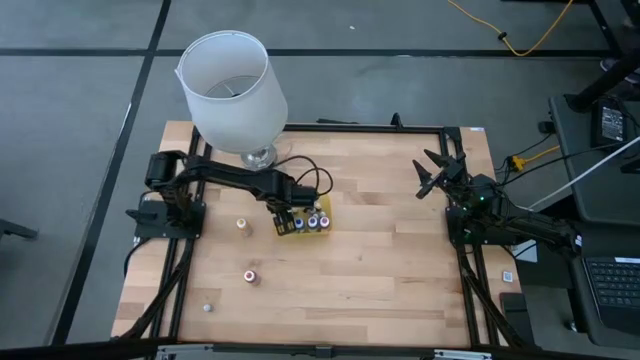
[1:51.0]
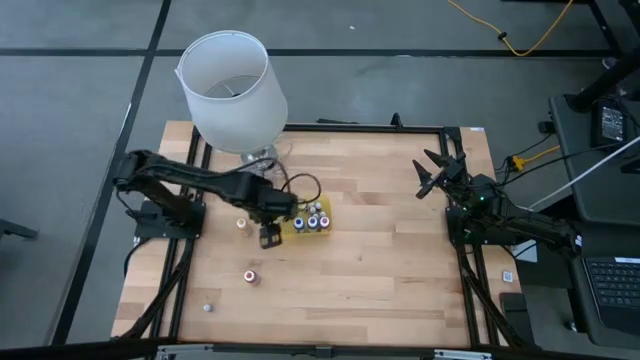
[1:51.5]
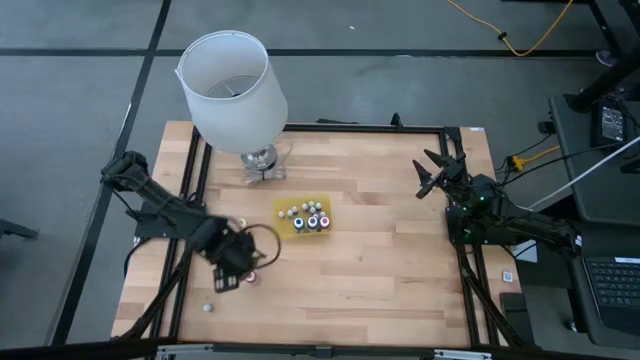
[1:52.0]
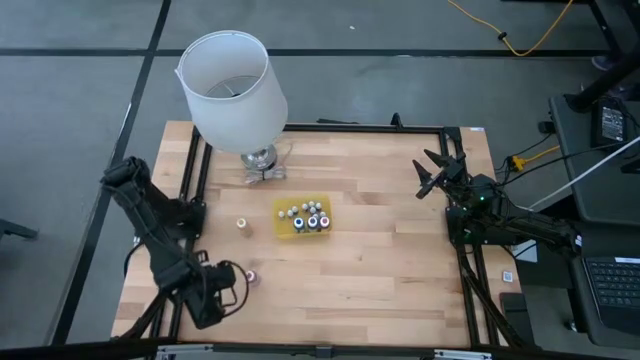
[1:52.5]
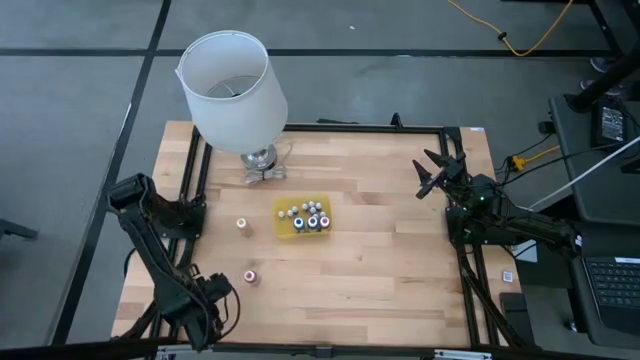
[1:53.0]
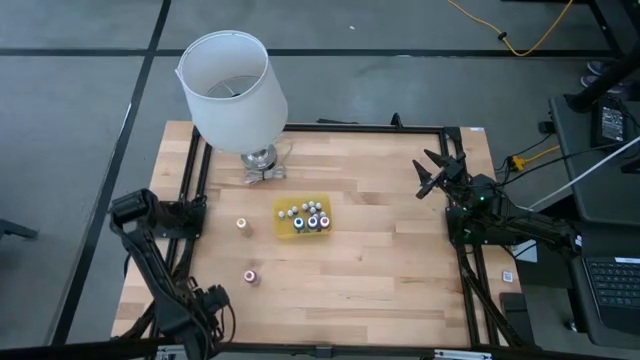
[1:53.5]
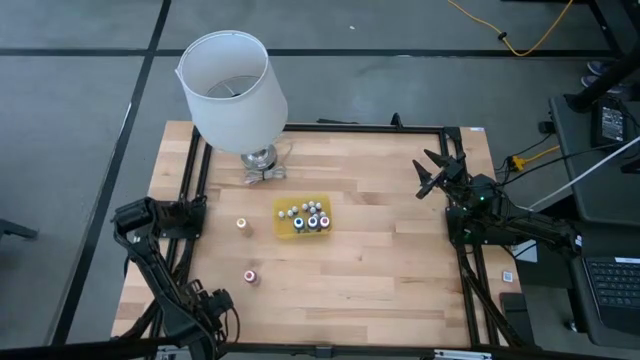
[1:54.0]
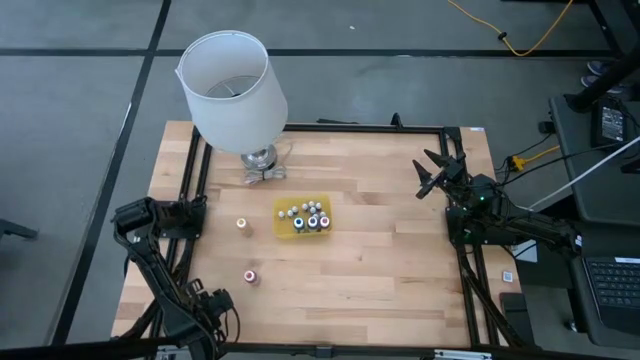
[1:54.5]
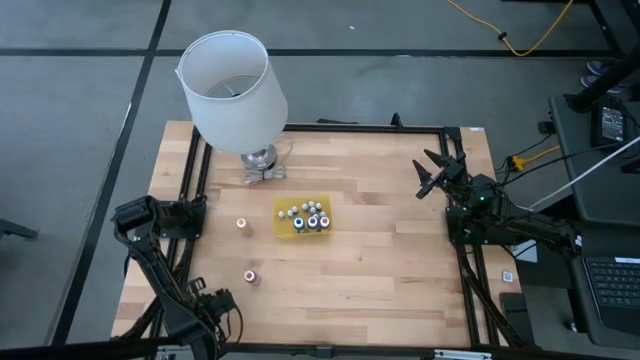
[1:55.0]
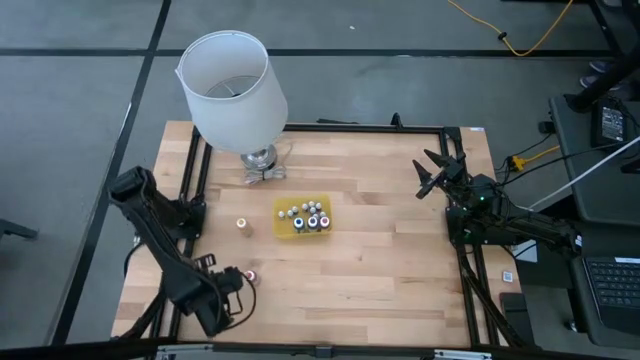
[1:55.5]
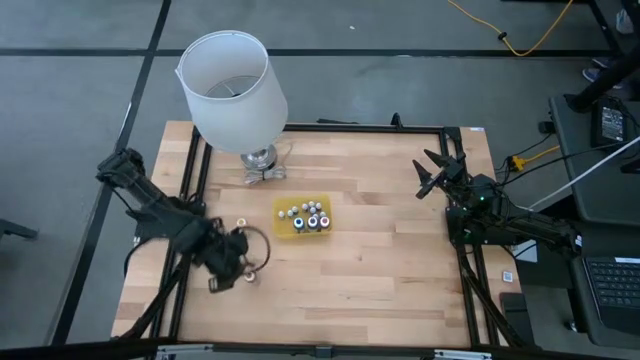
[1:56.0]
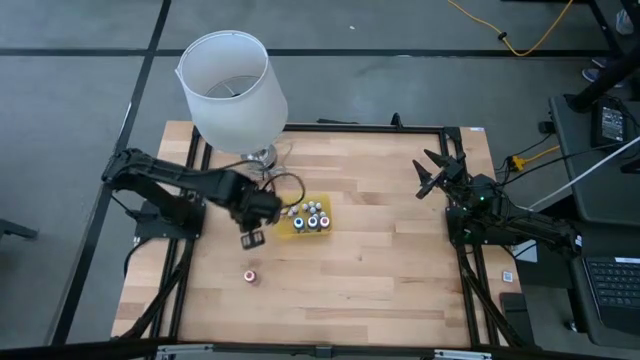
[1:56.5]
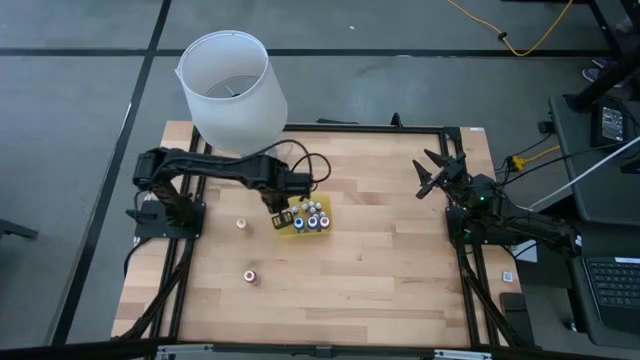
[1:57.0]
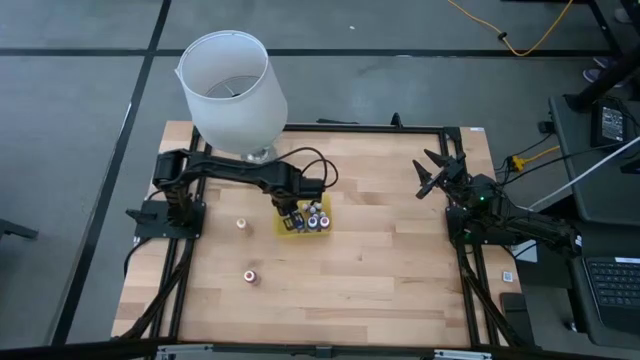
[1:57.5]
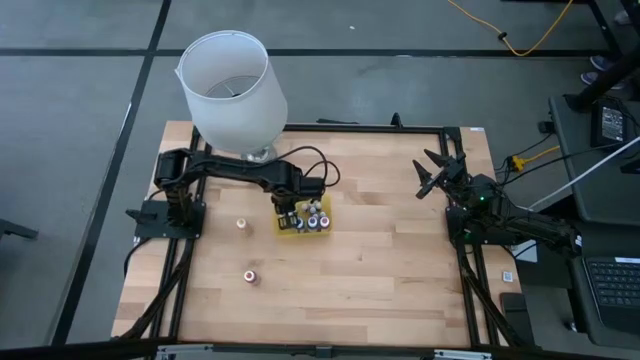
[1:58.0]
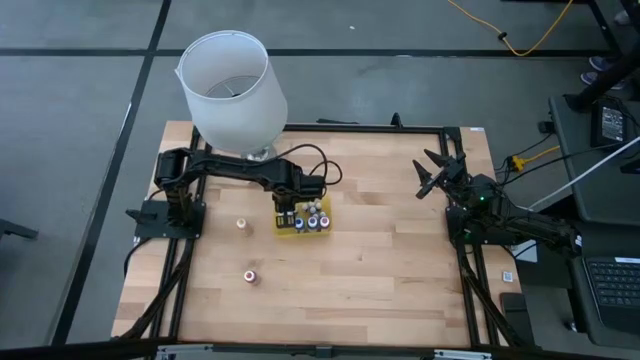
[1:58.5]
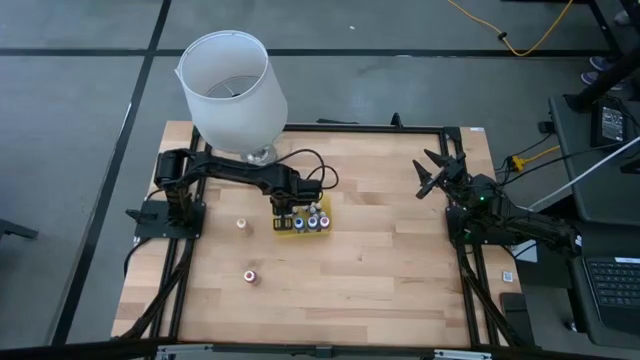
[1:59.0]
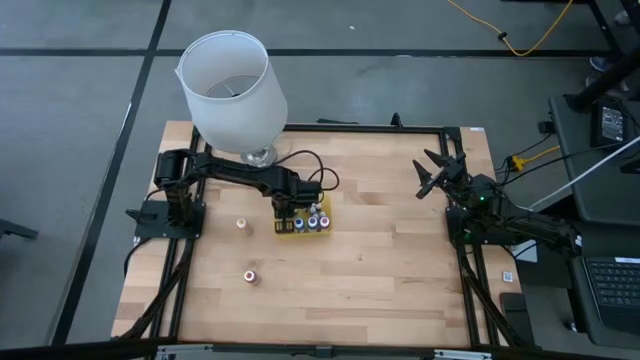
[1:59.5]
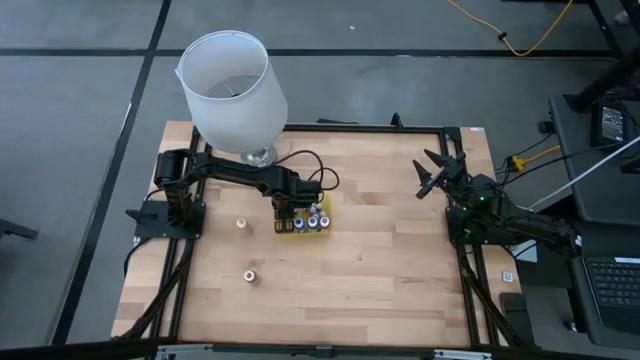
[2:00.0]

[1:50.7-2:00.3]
Task: Pick & Place food coloring
Put the black food coloring bottle into the yellow bin

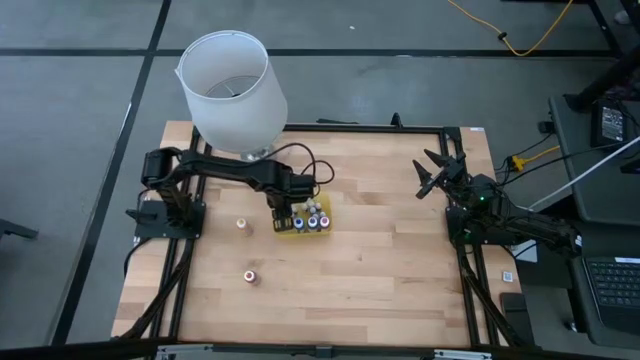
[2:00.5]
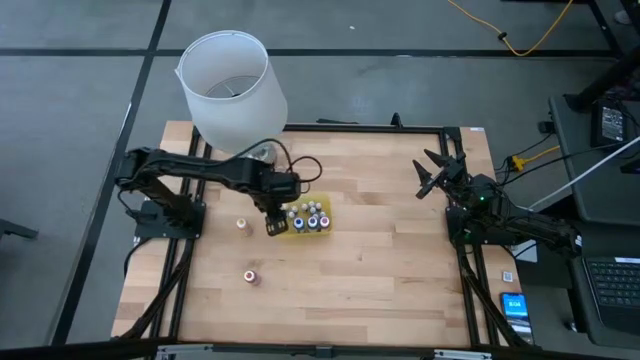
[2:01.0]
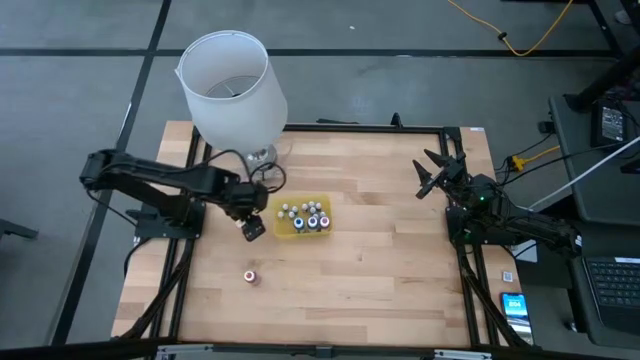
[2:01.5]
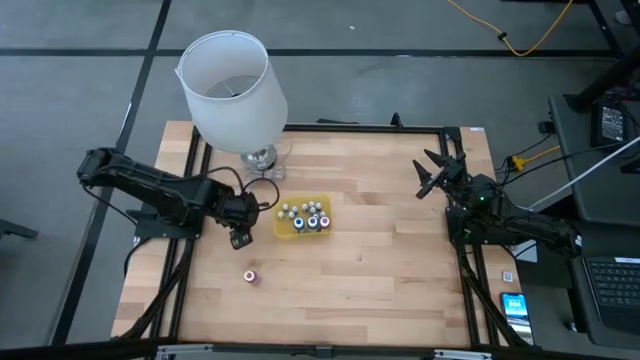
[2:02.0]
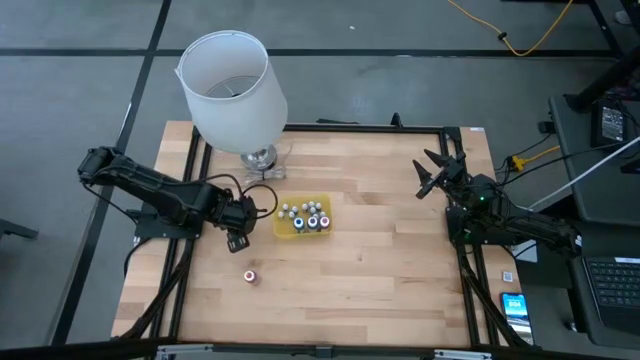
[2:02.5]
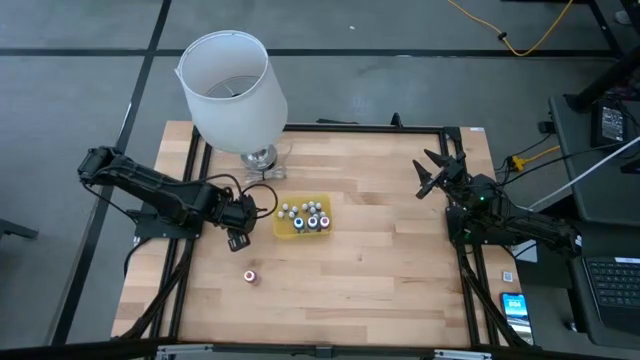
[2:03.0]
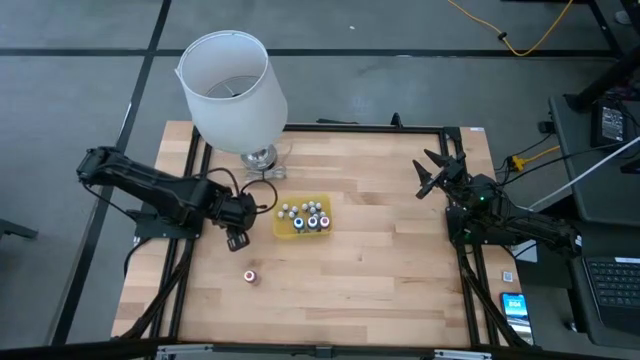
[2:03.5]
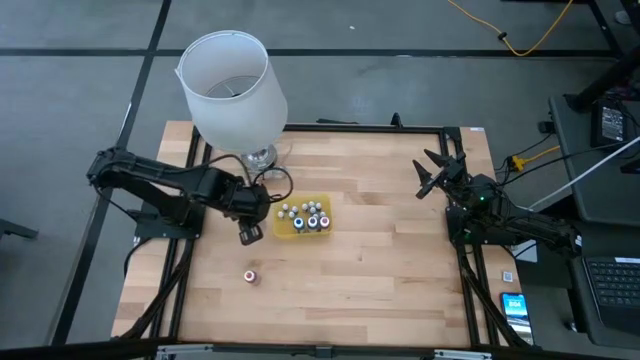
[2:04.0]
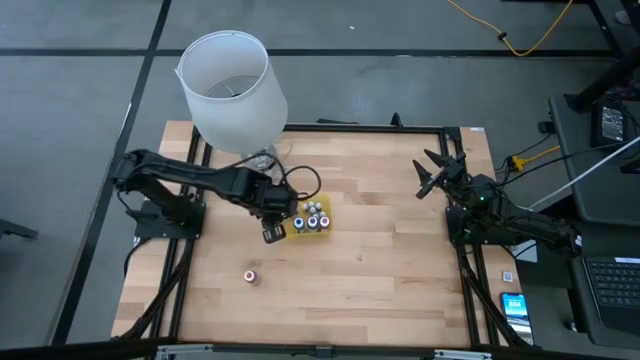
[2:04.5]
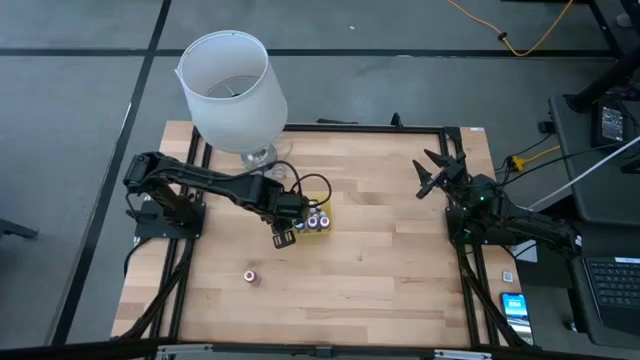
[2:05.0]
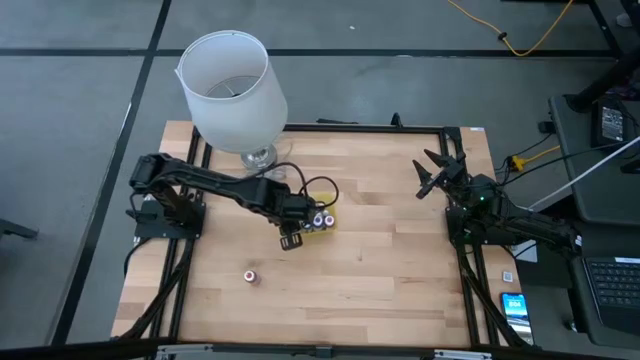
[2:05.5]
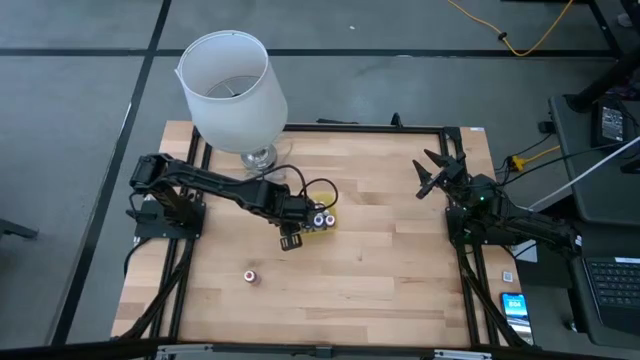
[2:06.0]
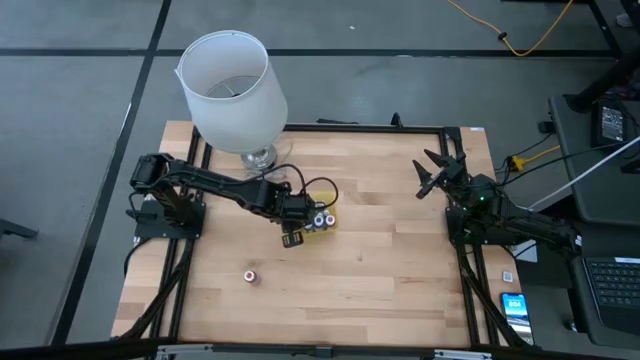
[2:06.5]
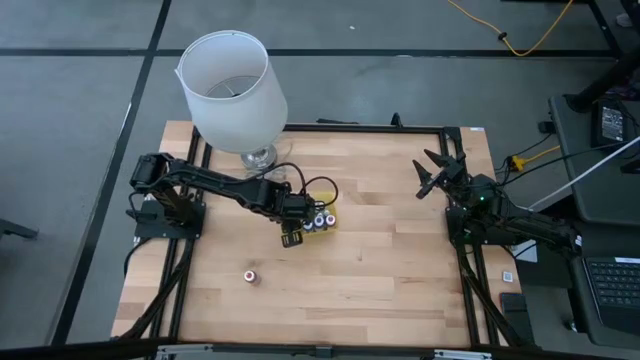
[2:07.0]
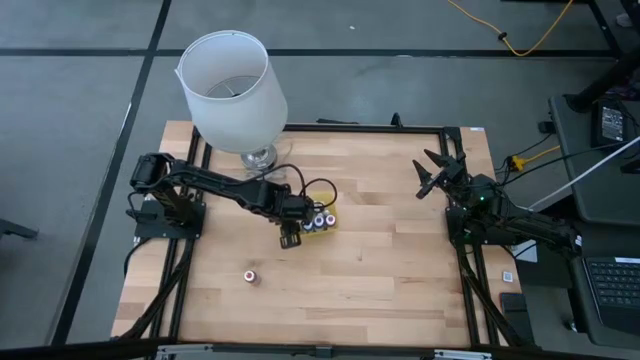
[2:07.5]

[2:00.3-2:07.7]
Put the yellow food coloring bottle into the yellow bin

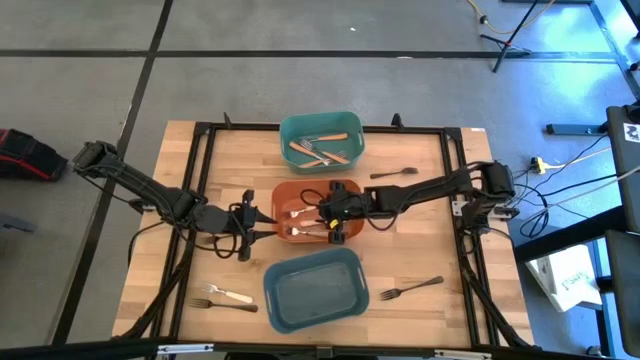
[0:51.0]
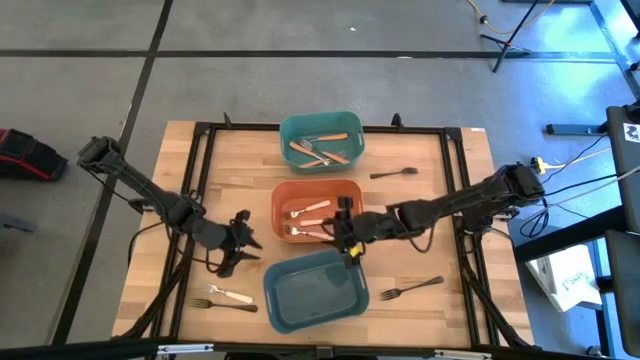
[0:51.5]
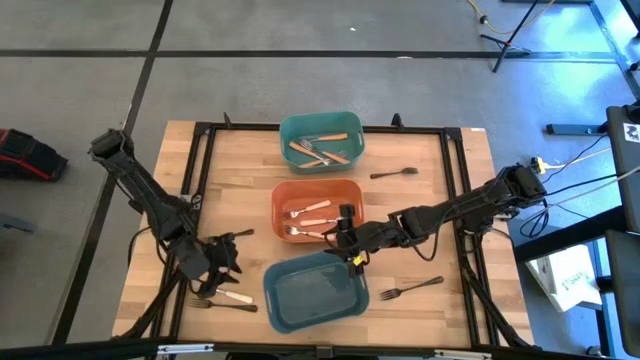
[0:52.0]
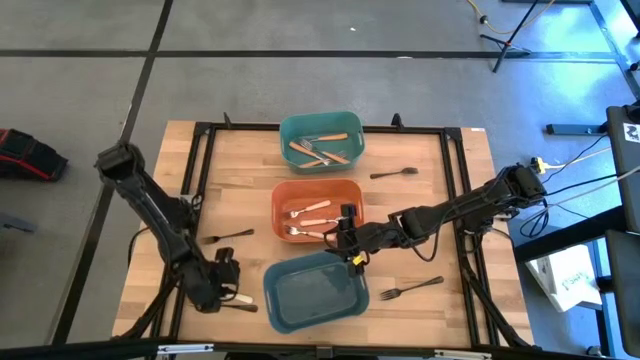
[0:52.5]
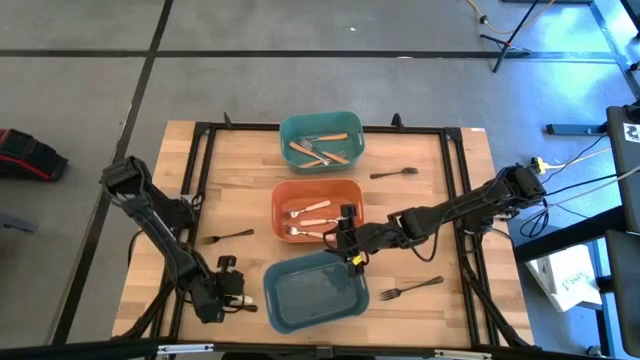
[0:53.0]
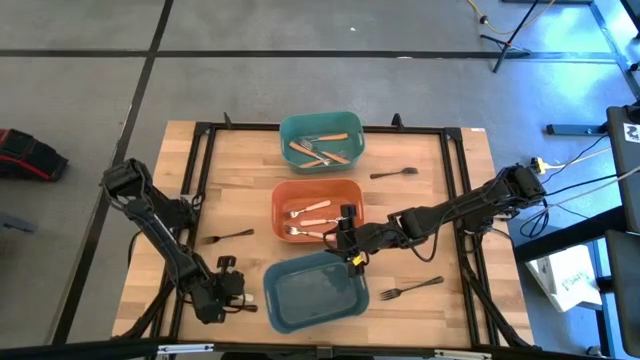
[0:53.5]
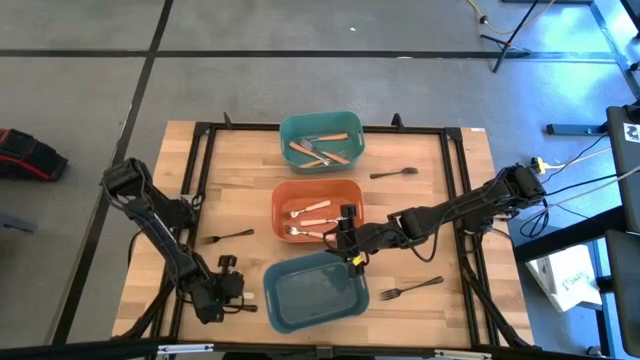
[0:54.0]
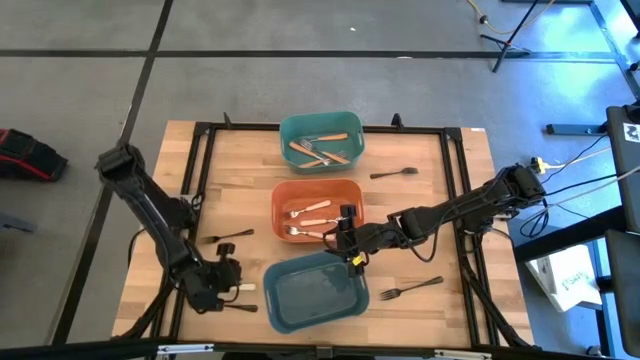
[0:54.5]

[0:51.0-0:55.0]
Task: Sort silverware by color (type)
Put the white fork into the orange bin
